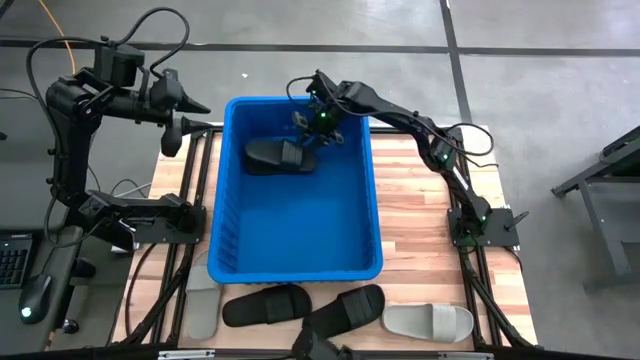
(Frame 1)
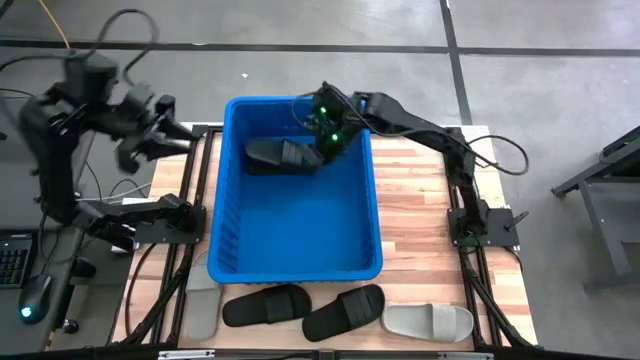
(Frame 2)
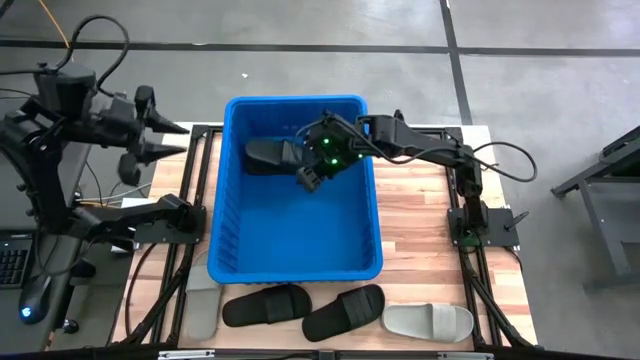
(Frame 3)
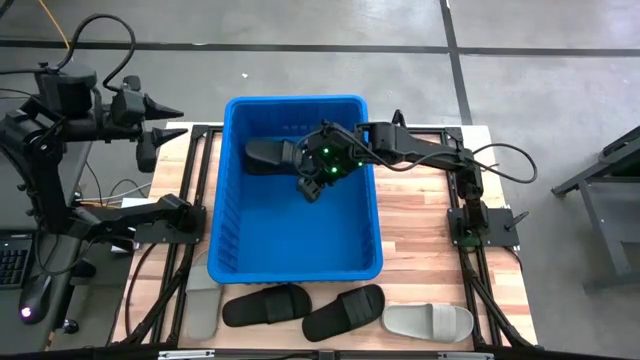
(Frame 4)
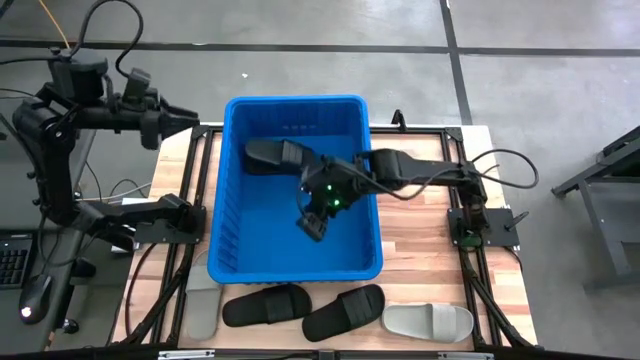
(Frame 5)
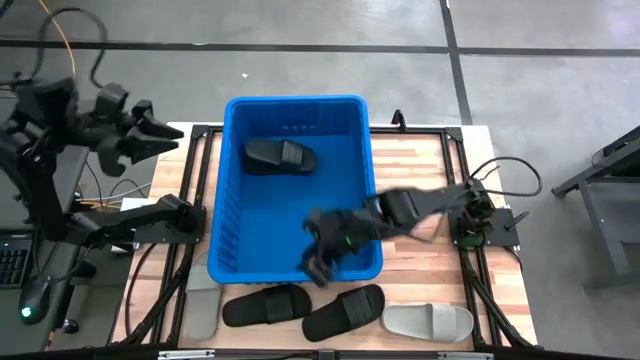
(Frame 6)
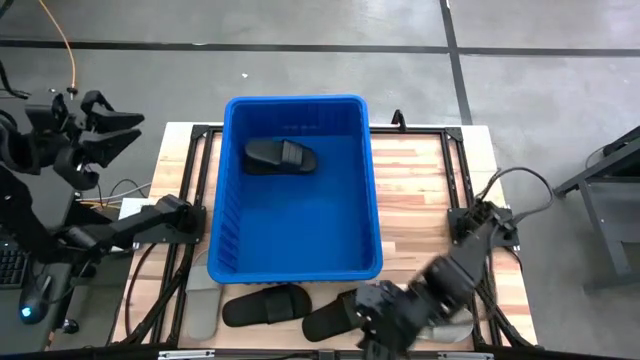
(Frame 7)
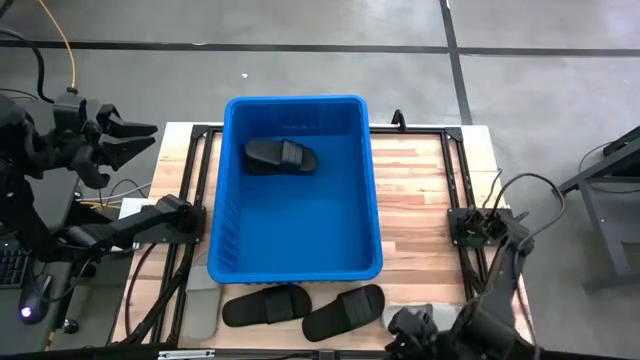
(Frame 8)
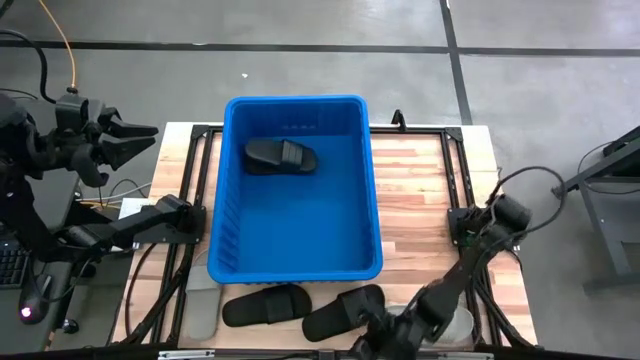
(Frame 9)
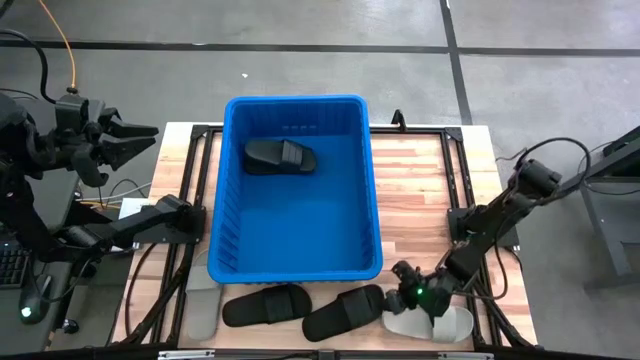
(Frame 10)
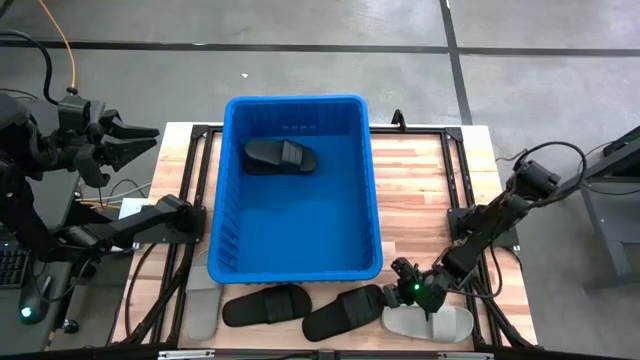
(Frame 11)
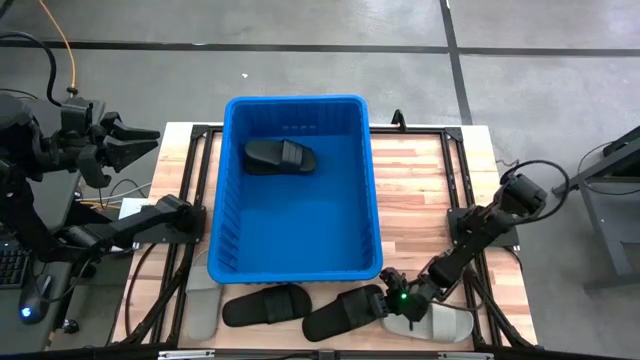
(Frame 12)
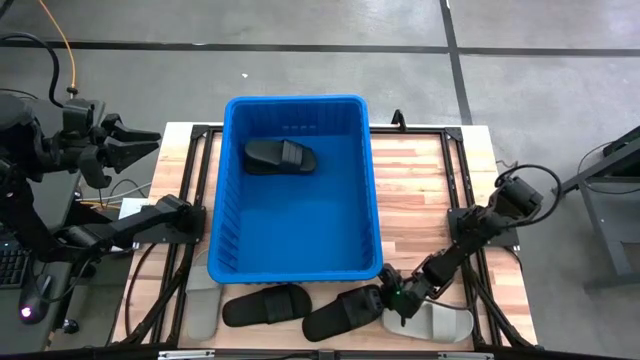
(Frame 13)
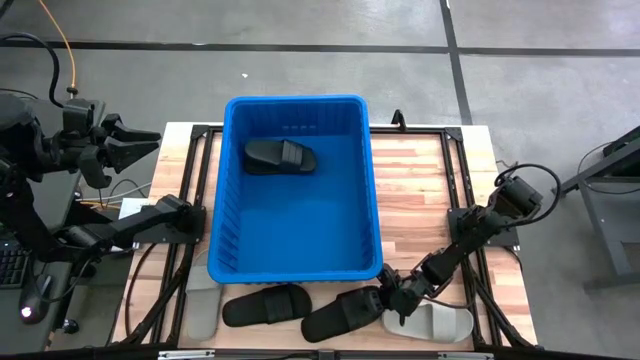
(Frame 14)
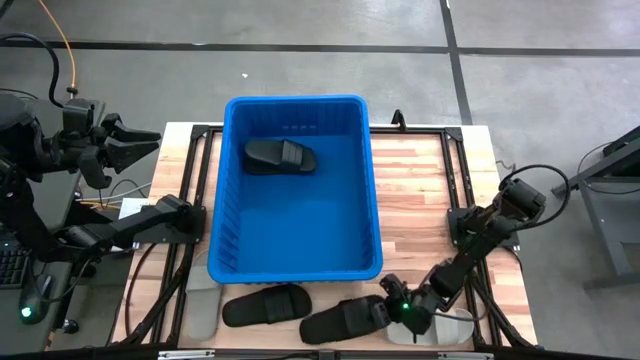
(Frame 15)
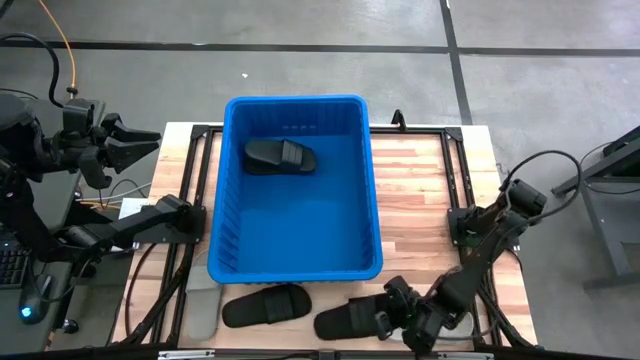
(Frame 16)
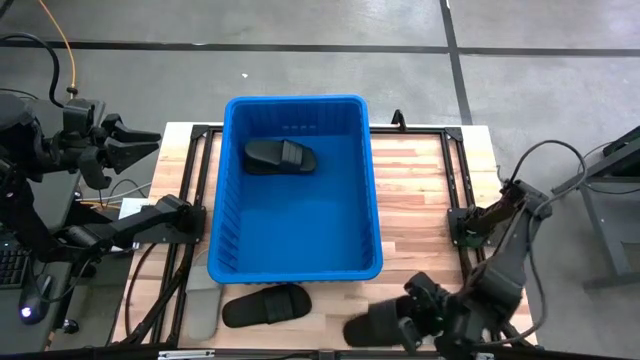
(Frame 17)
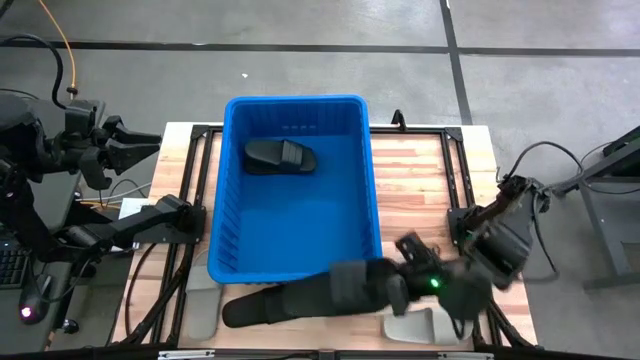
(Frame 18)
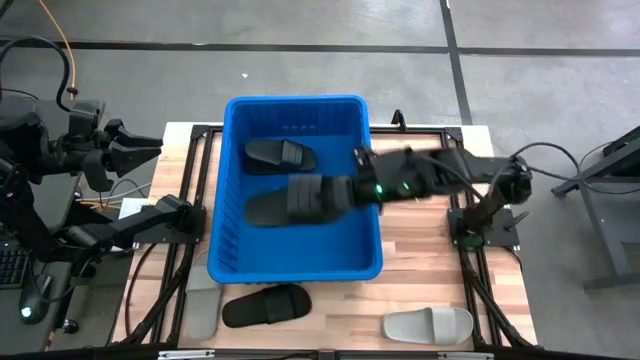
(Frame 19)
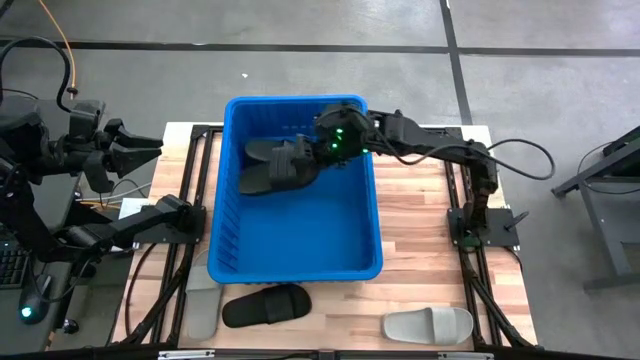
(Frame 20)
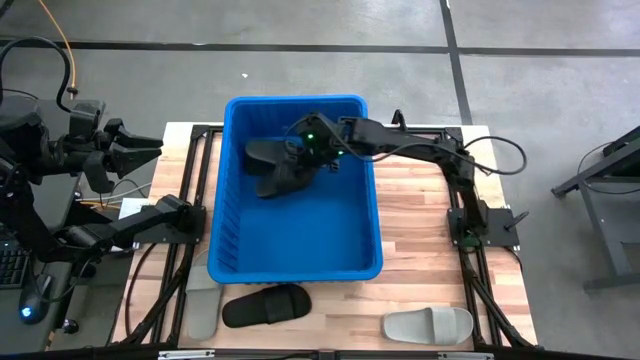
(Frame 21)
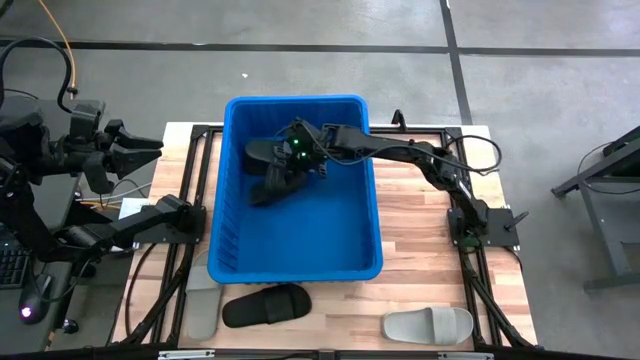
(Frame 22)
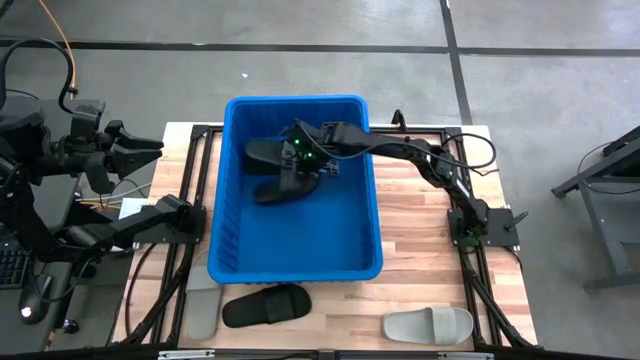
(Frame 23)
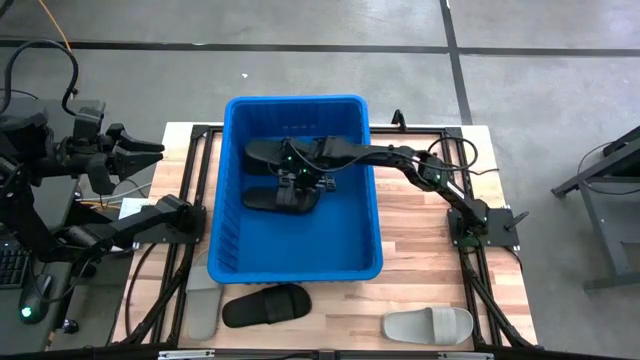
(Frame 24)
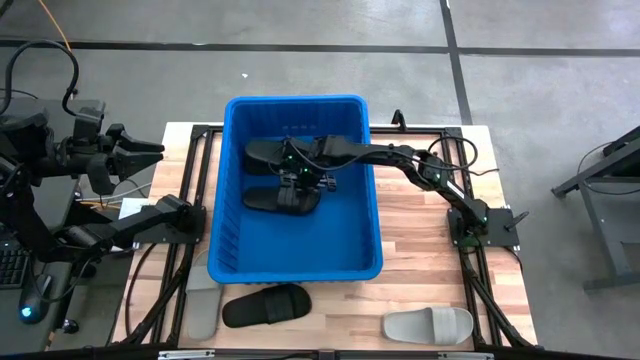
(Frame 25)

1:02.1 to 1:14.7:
Task: Pick and place slides into bin
Put the right black slide into the blue container

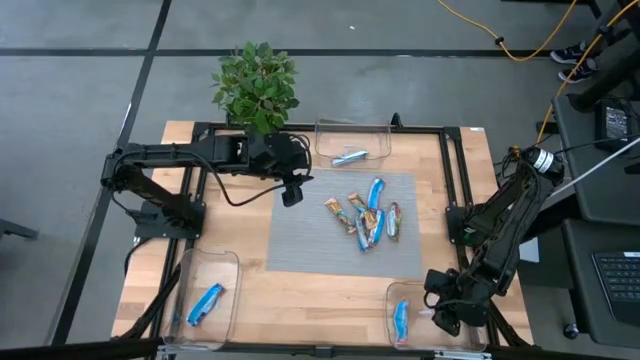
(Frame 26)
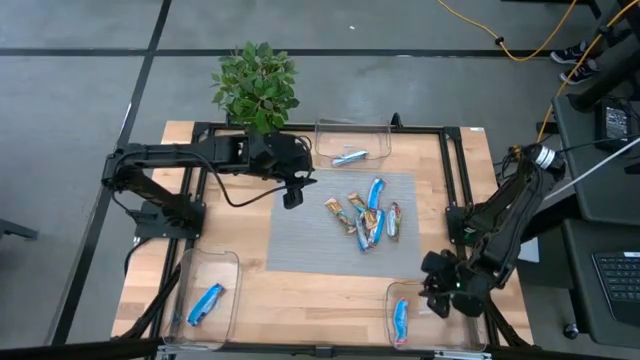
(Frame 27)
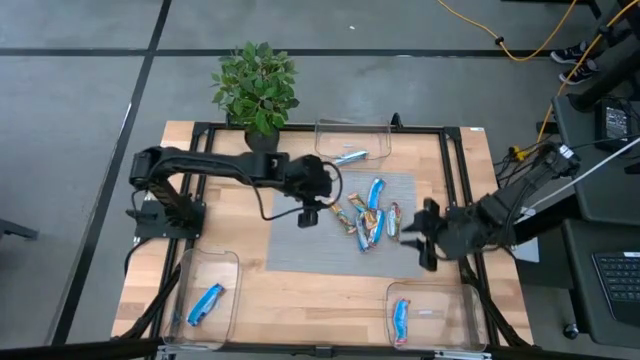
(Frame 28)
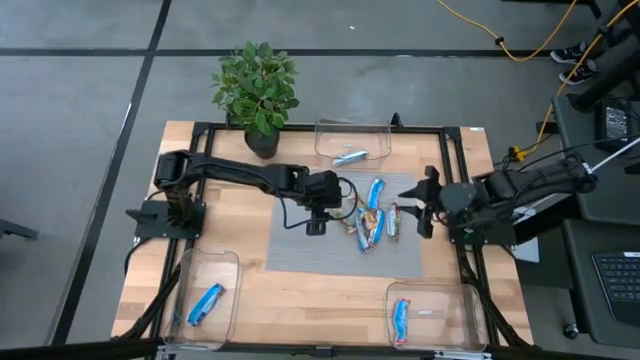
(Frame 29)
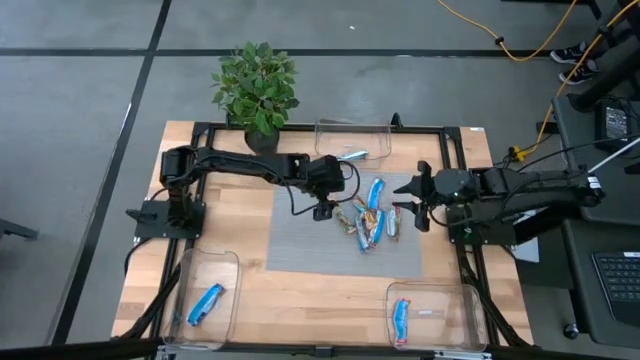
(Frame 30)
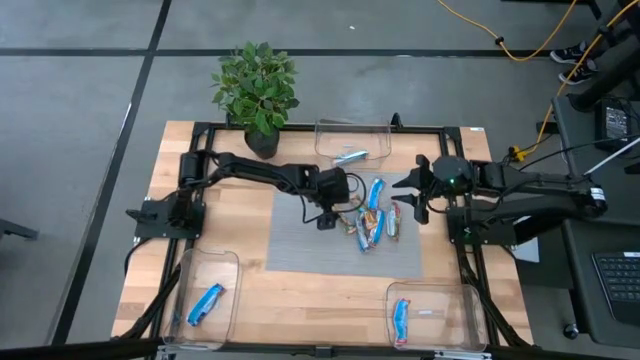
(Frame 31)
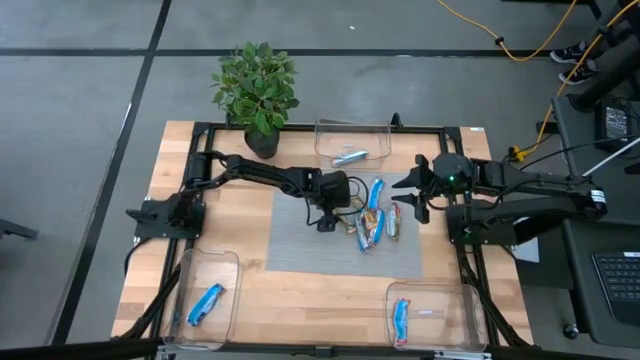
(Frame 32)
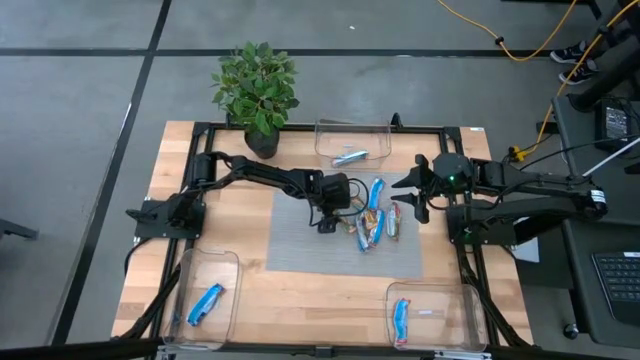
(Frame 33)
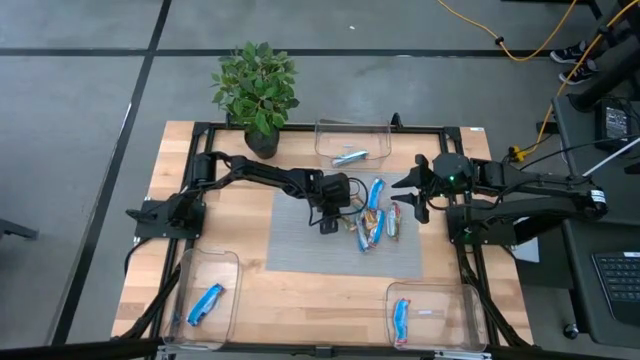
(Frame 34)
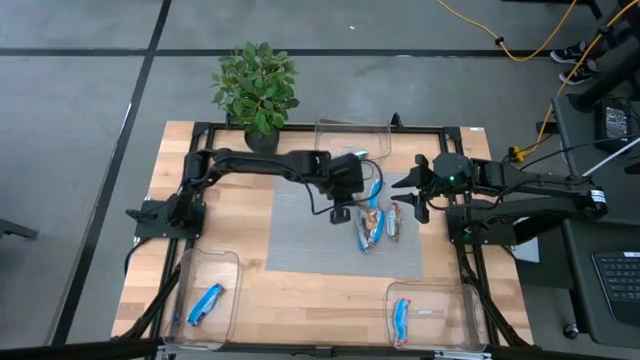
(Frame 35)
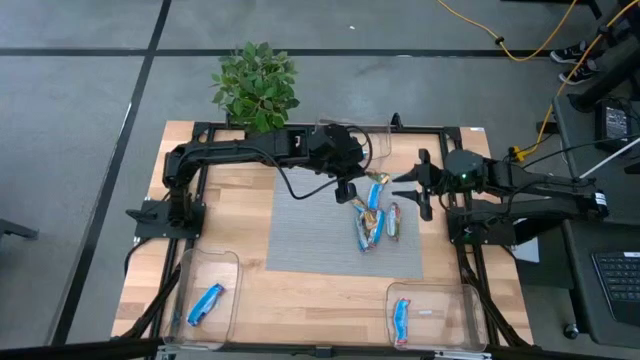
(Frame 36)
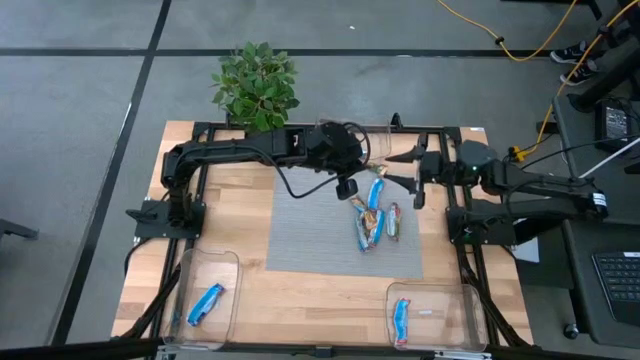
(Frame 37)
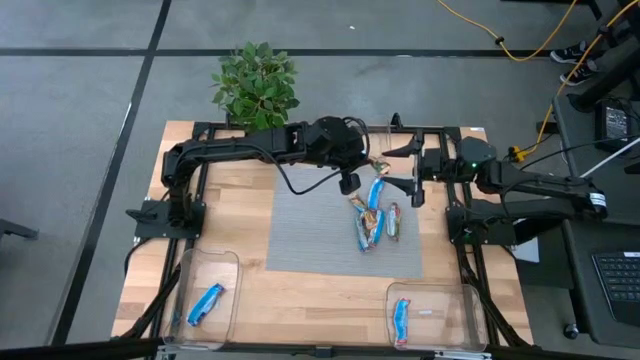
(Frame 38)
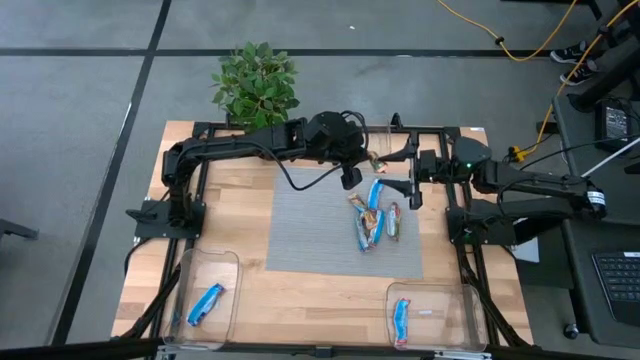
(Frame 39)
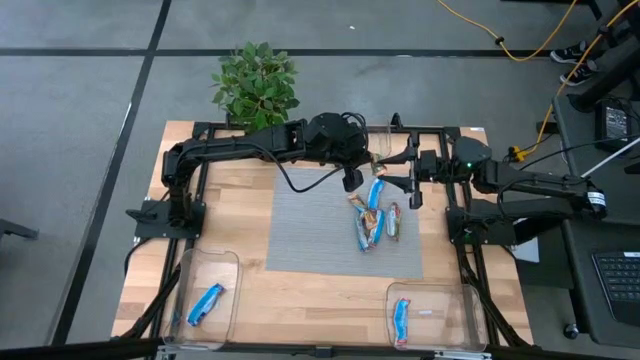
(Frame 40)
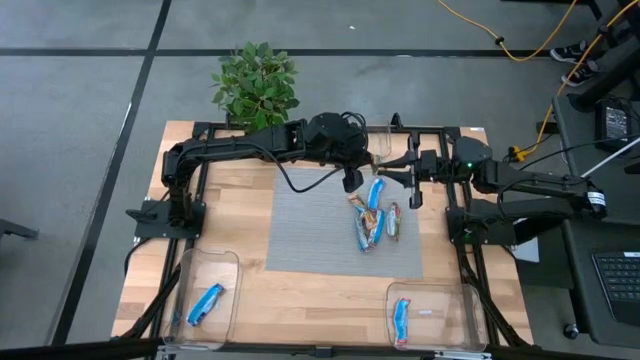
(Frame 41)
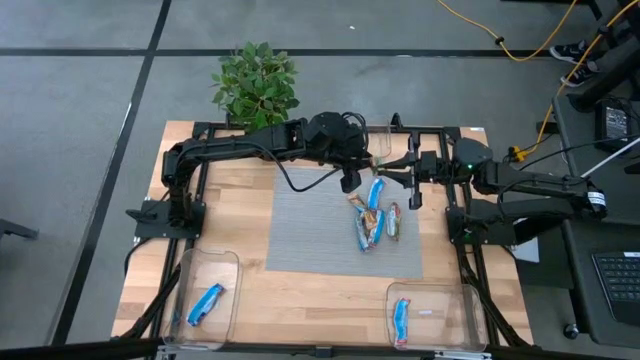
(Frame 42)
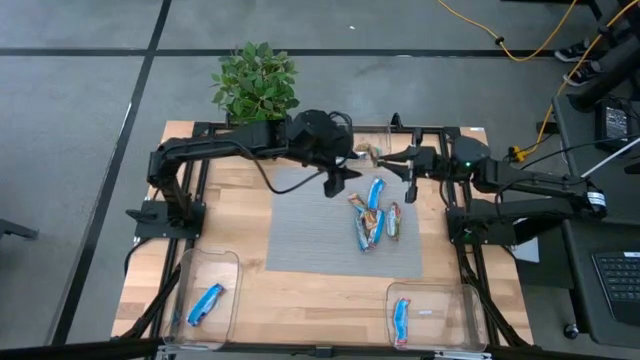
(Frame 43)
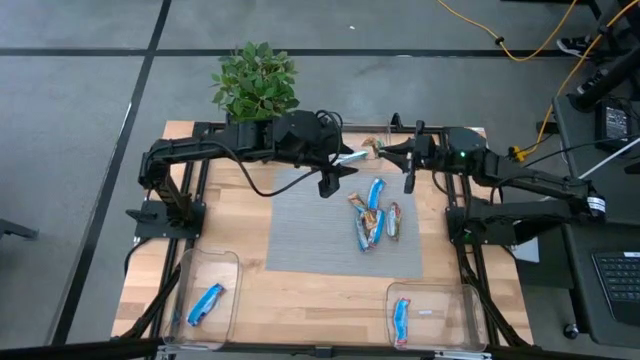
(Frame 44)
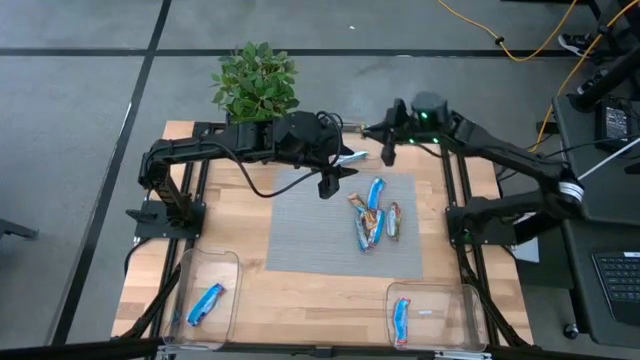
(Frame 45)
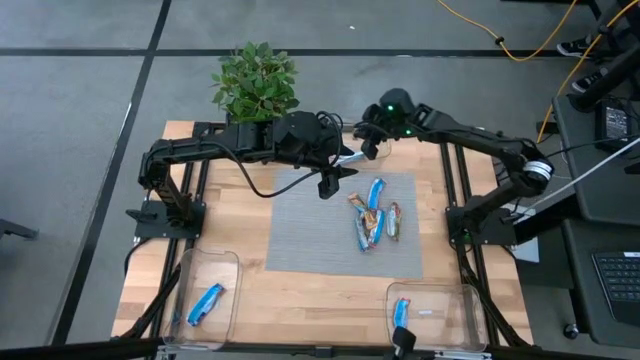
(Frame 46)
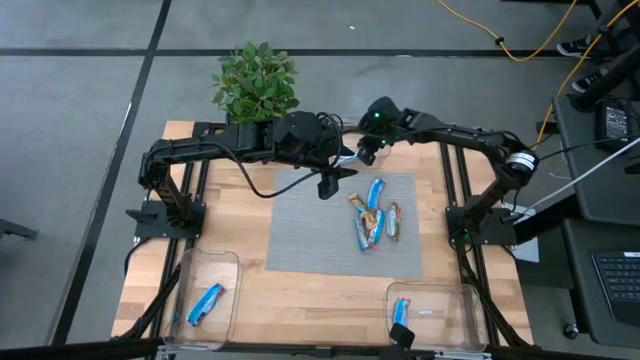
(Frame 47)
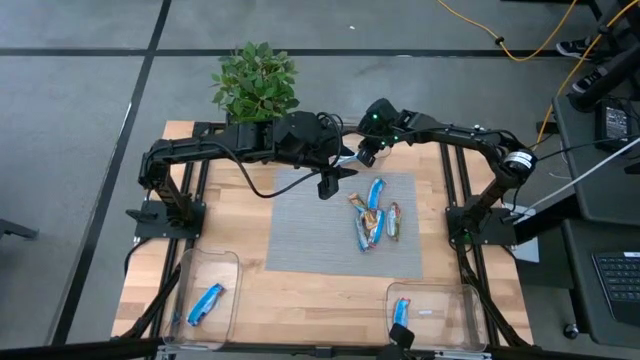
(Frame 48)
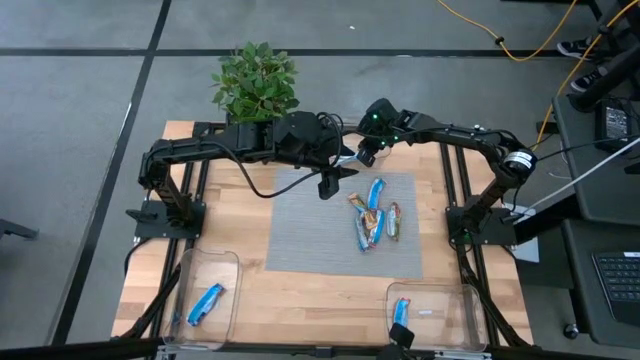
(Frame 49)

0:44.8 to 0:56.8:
Task: Pick and place Granola Bars by type
Put the yellow granola bar into the top transparent bin
